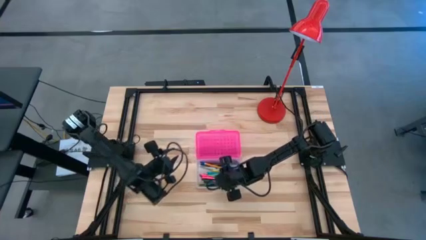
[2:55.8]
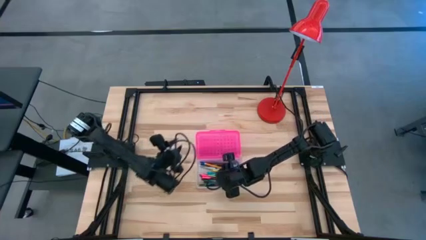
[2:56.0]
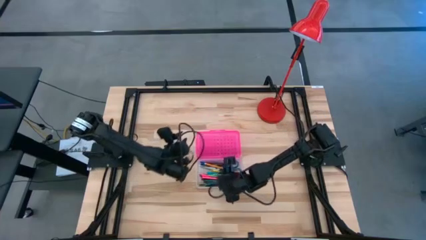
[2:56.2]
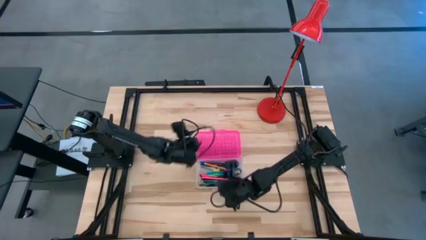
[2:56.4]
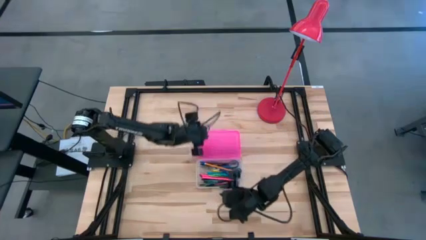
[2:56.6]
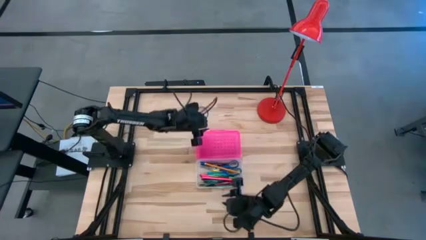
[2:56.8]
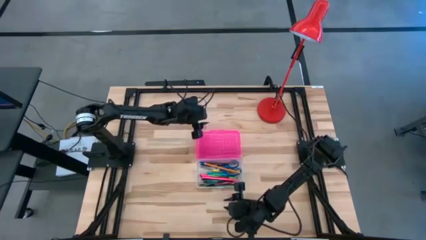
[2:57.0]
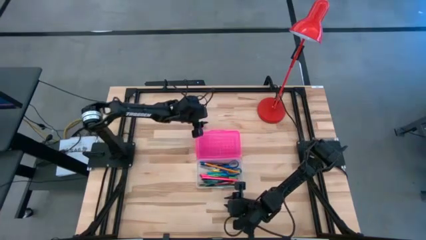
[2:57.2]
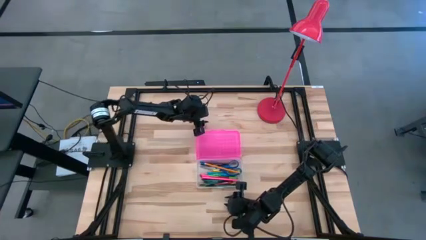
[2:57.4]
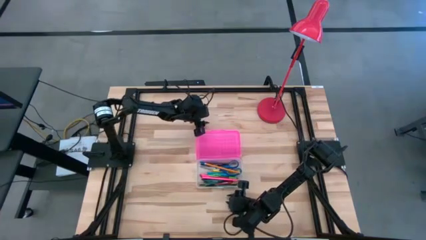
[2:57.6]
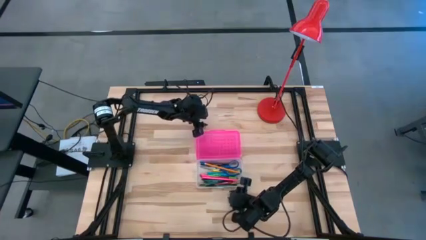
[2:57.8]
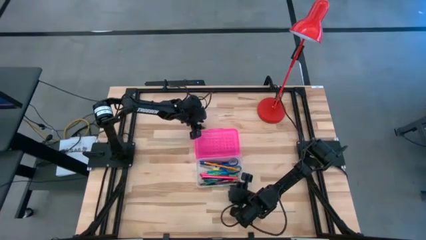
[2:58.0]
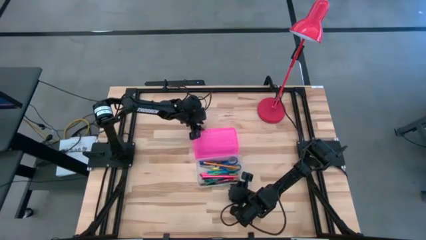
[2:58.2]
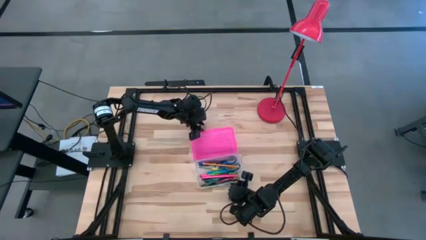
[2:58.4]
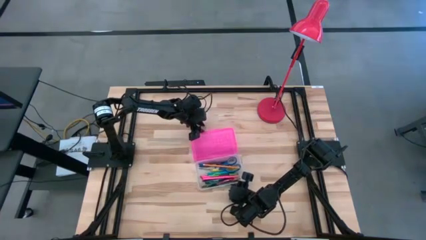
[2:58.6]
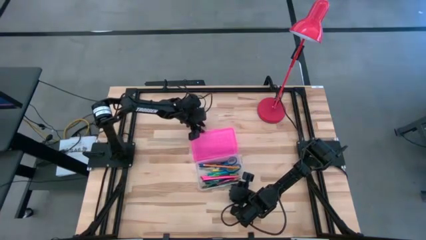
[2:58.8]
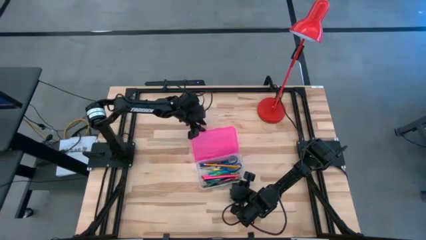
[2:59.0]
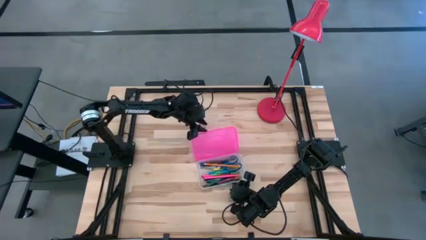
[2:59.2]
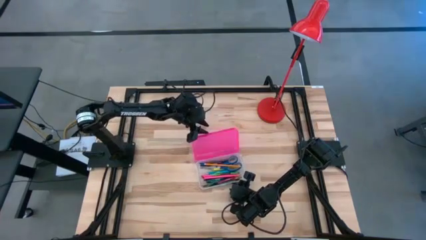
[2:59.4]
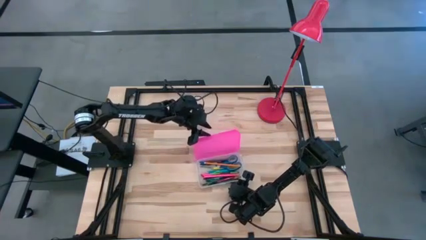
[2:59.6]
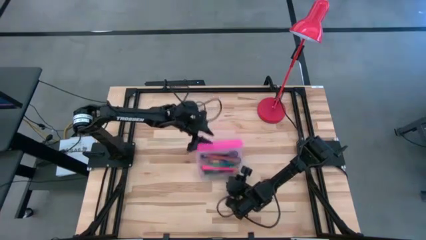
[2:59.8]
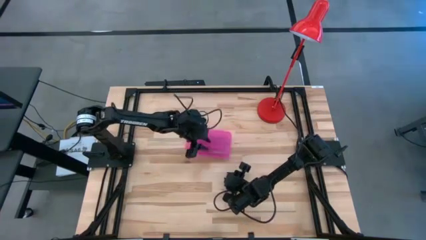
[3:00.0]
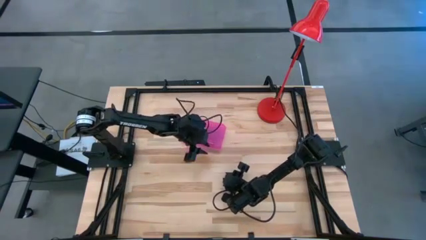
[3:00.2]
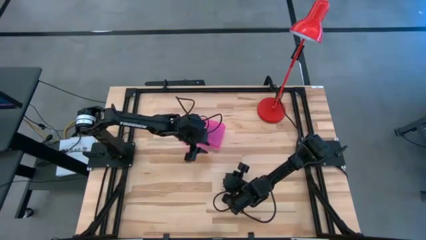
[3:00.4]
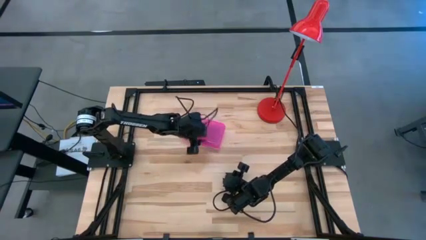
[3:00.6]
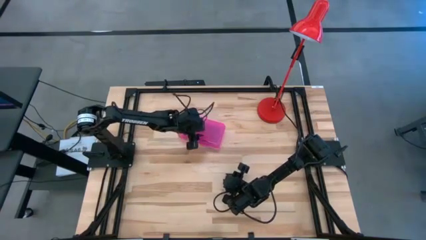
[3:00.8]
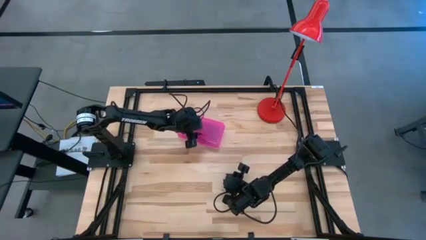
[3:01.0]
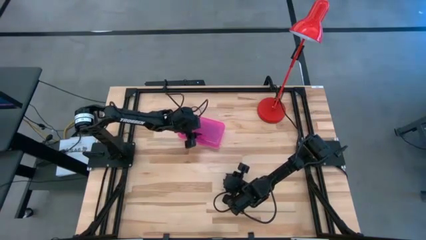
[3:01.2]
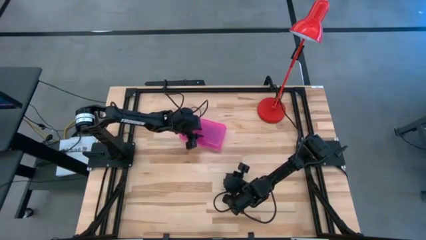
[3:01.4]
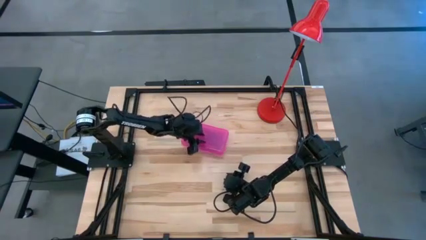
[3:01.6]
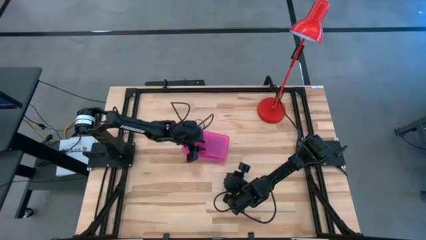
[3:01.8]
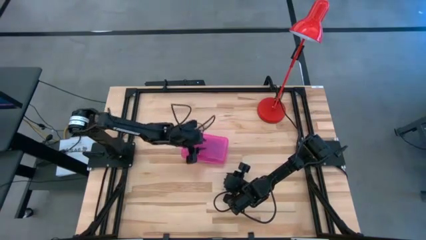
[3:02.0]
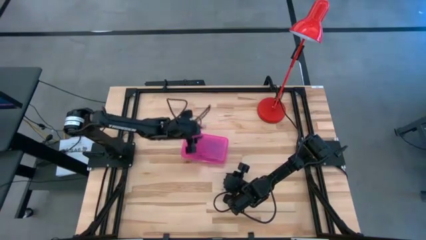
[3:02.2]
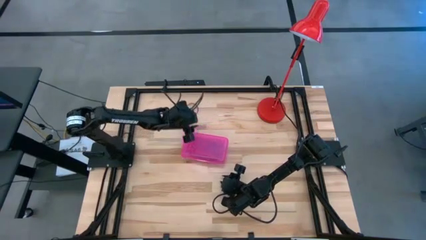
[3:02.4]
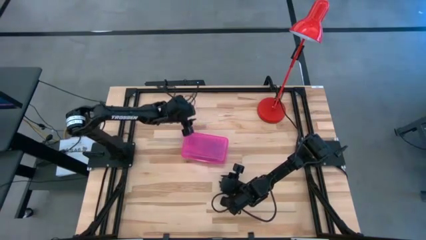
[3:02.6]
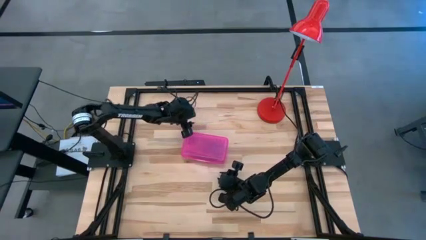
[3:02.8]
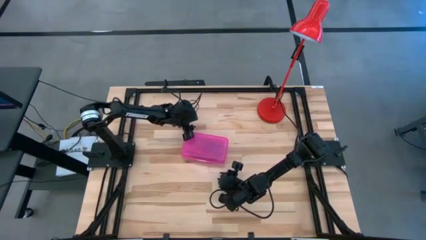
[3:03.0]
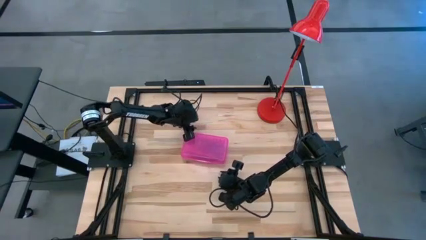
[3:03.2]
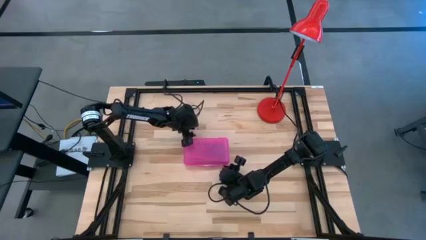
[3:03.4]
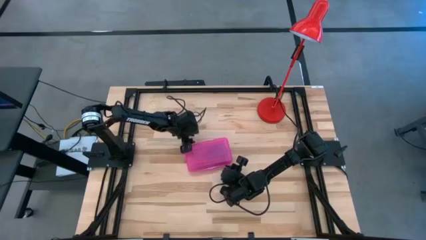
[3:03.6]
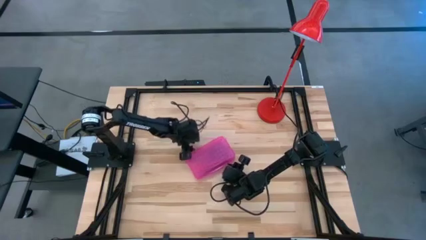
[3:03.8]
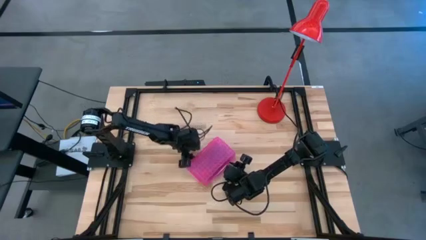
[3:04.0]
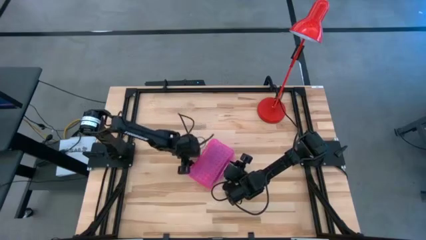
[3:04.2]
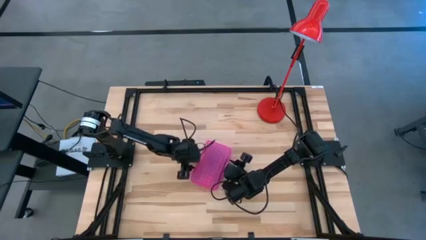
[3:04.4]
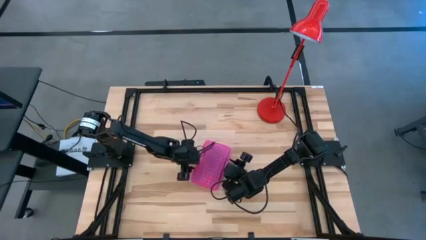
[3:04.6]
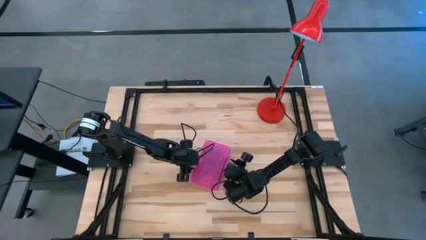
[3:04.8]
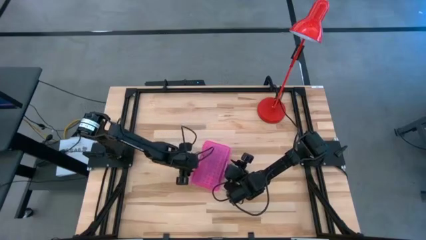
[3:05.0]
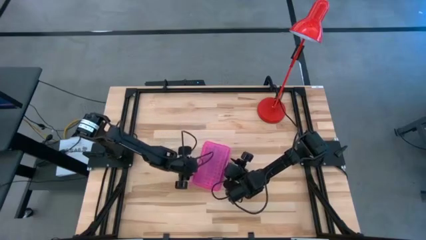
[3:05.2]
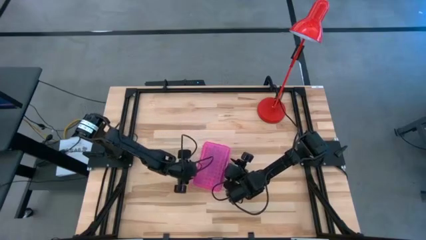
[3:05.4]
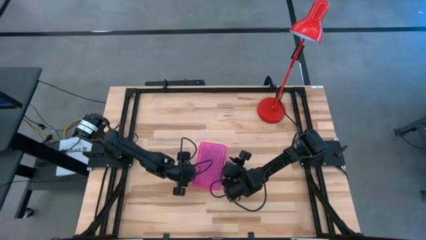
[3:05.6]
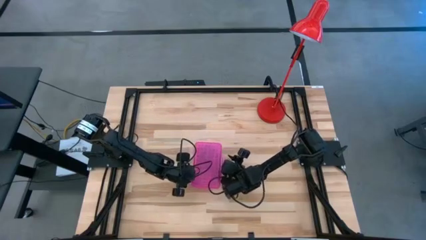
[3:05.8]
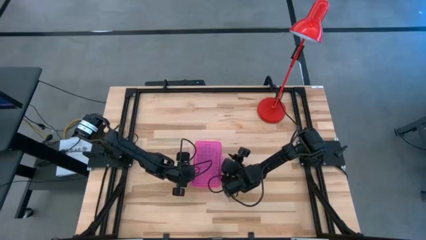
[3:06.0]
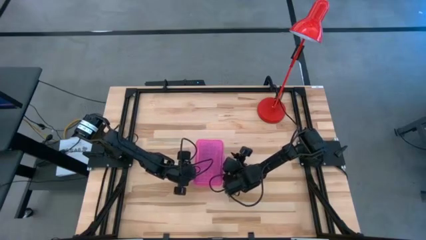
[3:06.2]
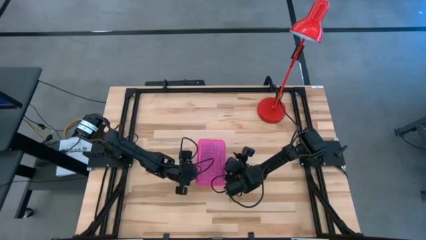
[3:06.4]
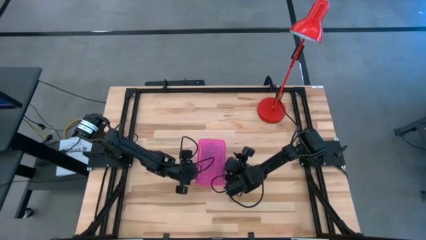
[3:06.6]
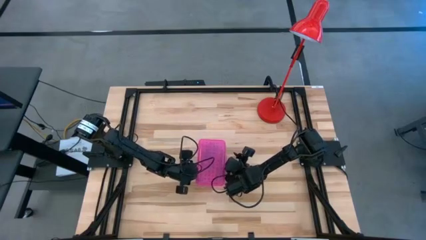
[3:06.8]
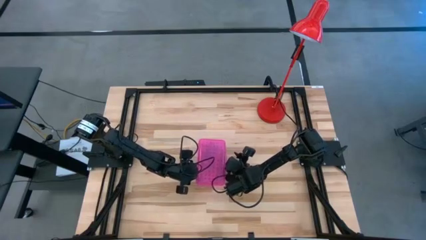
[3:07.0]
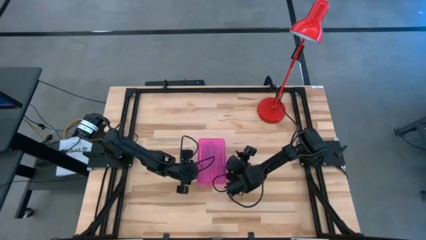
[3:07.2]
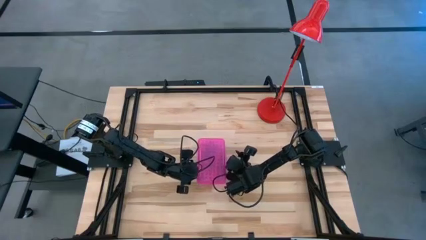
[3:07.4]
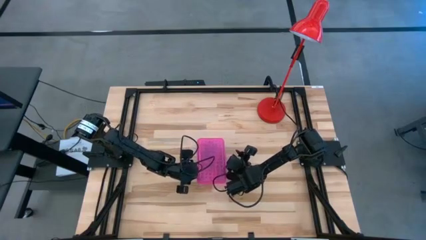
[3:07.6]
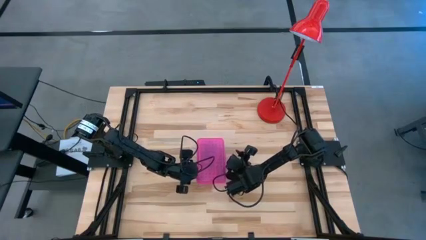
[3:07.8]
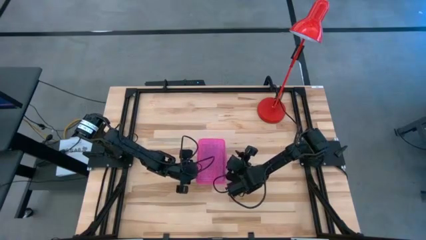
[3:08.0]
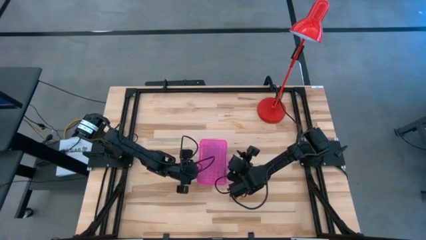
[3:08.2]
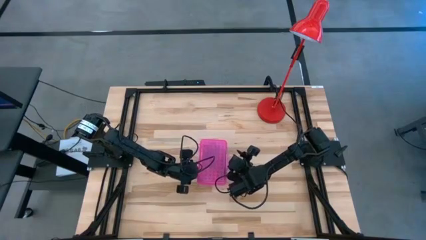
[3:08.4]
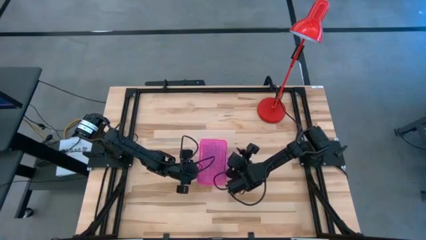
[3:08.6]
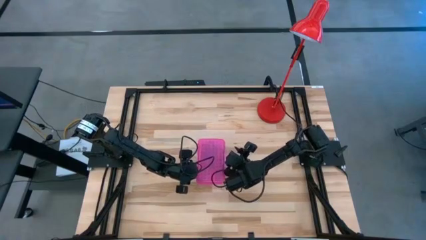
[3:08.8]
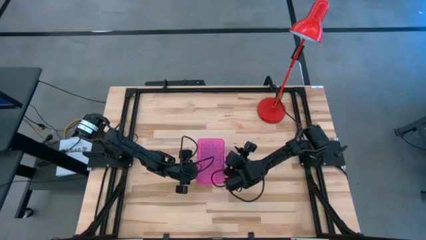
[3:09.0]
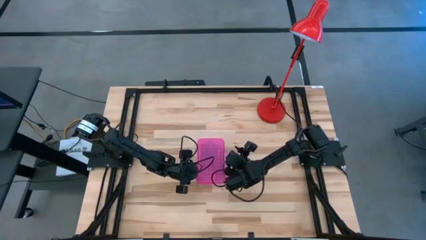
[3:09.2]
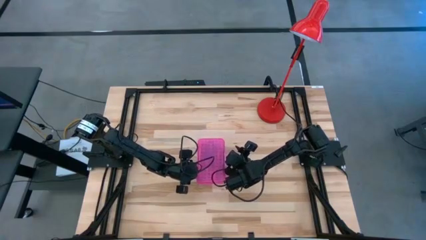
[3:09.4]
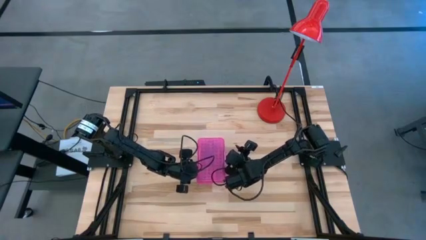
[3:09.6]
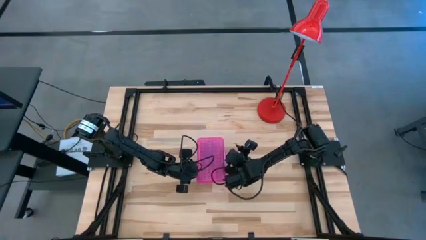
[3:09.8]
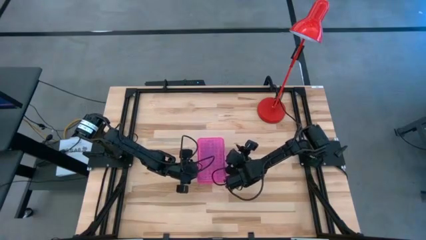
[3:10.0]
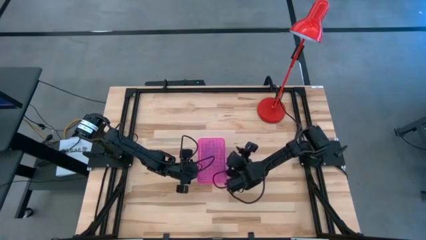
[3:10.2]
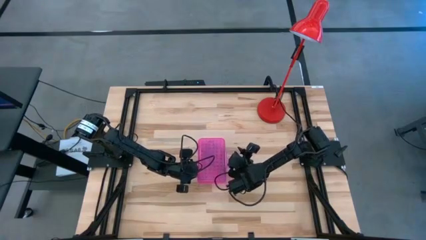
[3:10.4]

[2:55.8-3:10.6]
Task: Pick & place school supplies into a supply box
Close the pink supply box
